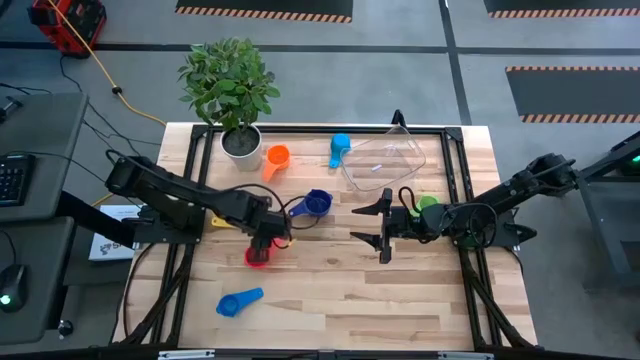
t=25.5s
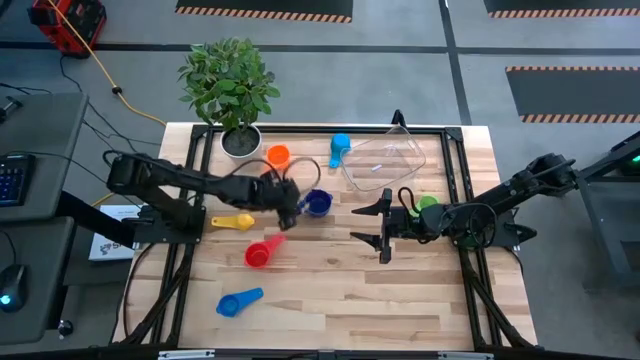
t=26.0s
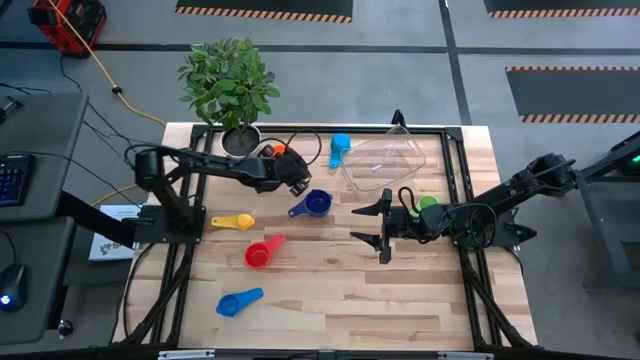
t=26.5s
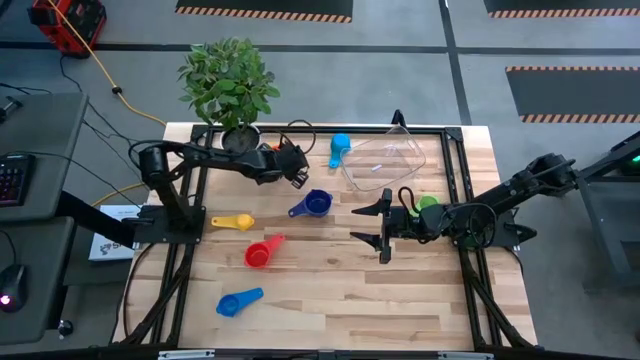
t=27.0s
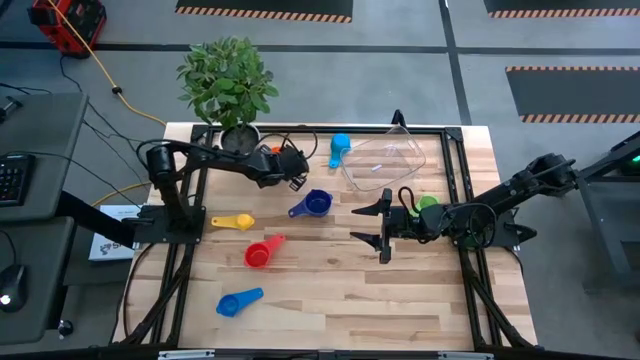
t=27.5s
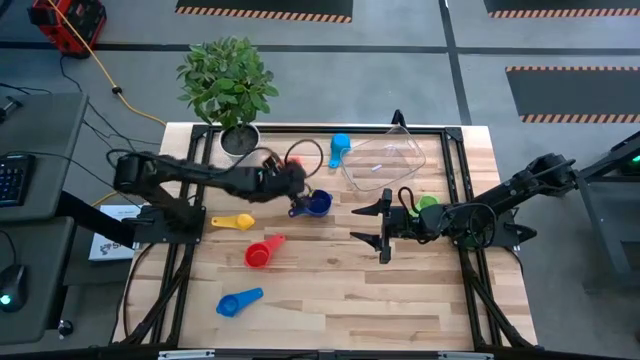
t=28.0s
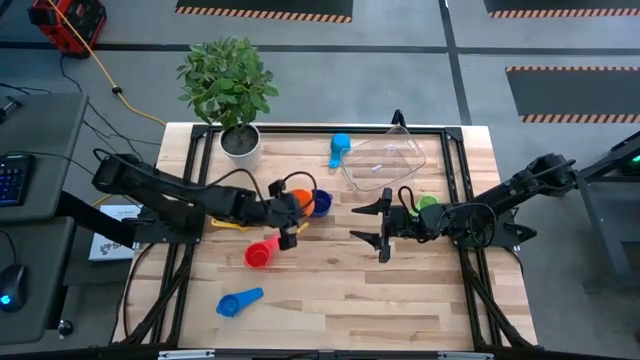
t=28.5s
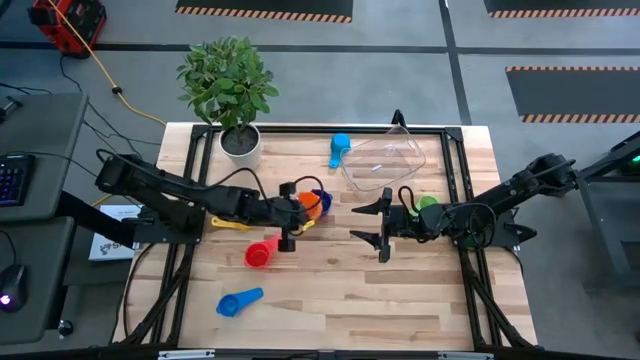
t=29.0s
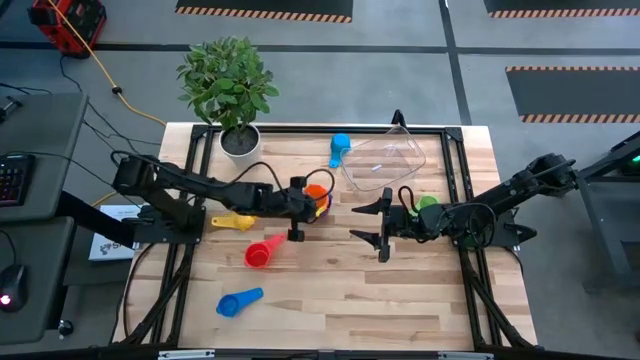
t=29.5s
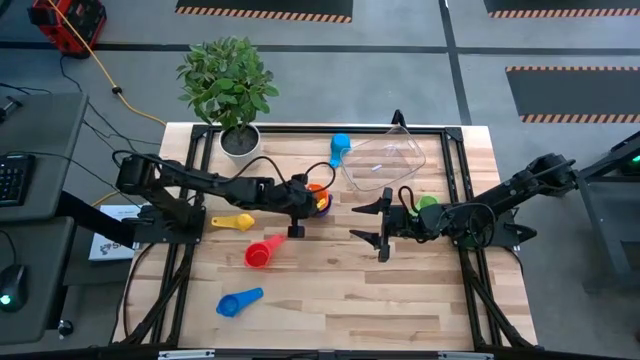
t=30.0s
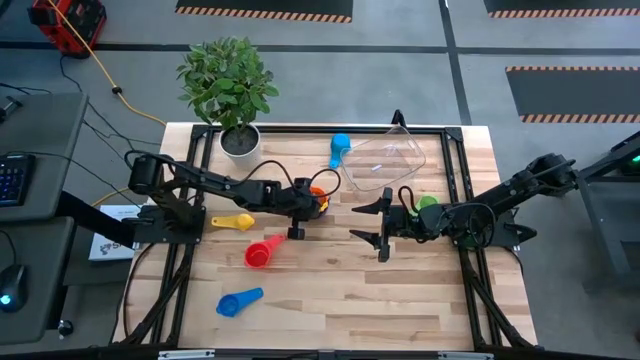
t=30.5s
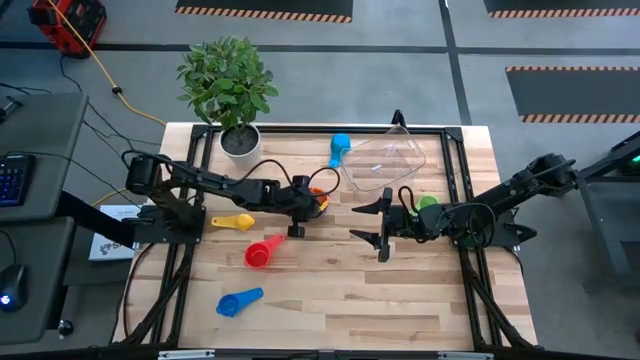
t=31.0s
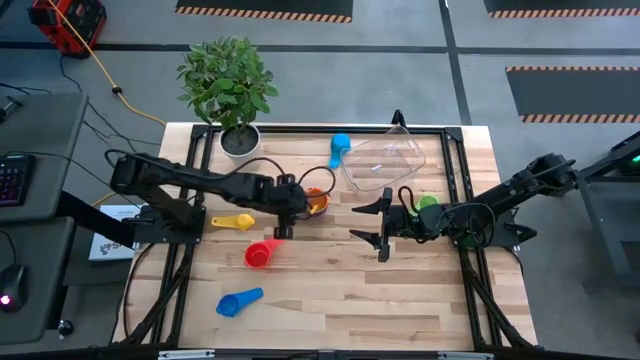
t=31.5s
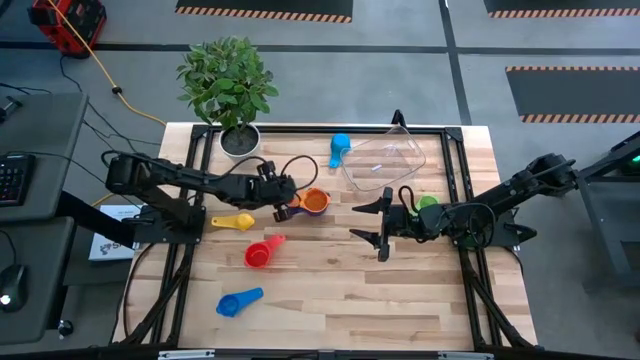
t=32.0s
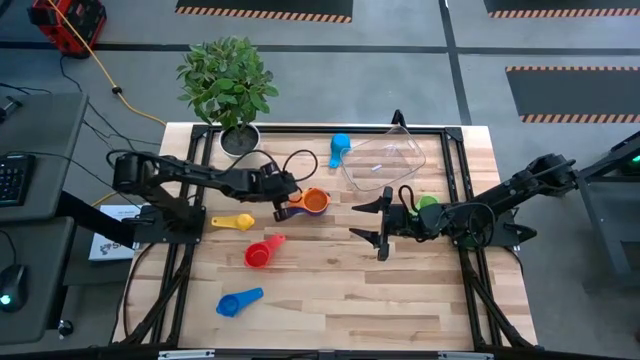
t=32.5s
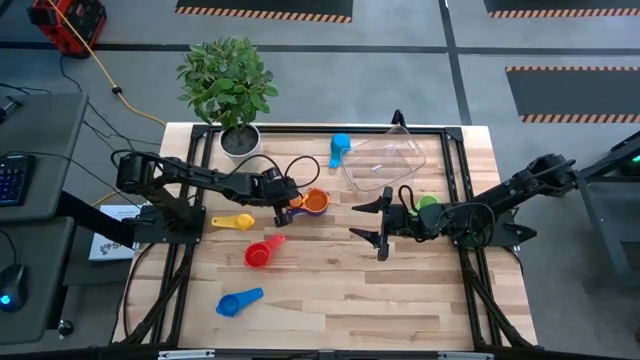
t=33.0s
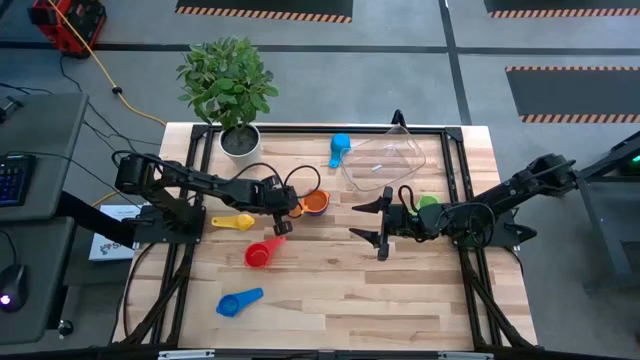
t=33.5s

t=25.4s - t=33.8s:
Task: Nest measuring cups in basket
Stack the orange measuring cup on top of the violet measuring cup

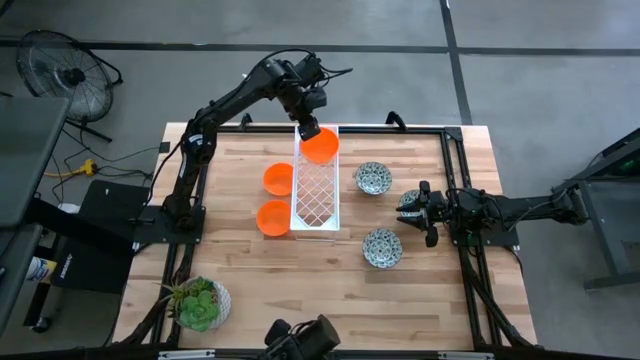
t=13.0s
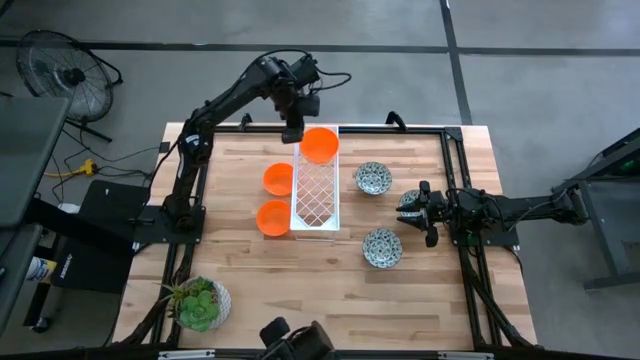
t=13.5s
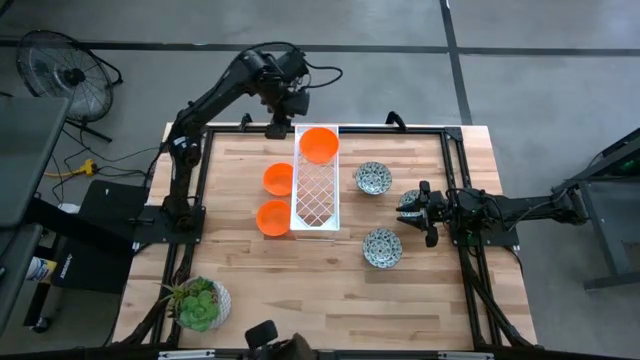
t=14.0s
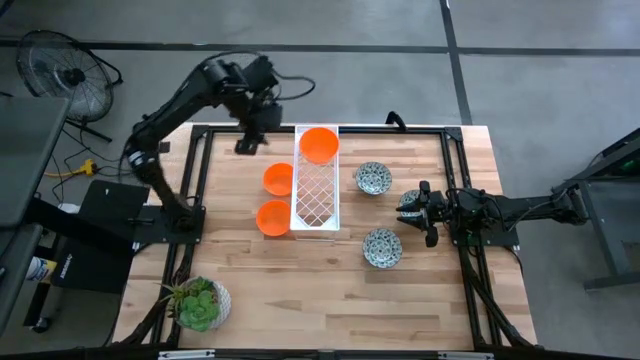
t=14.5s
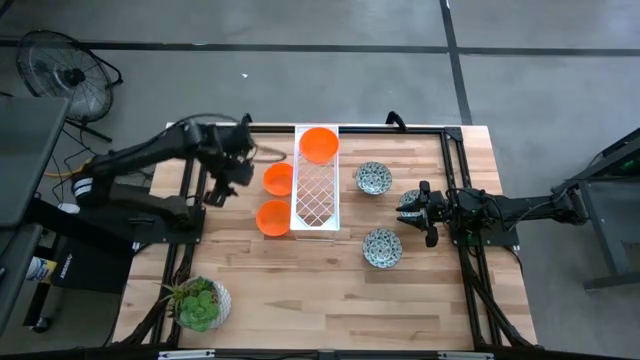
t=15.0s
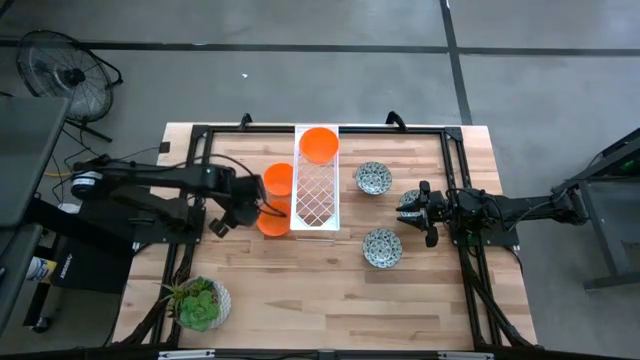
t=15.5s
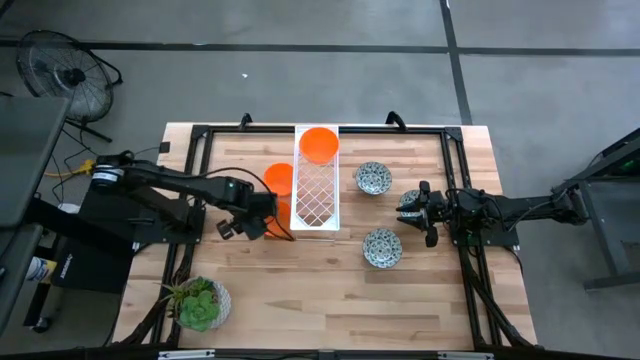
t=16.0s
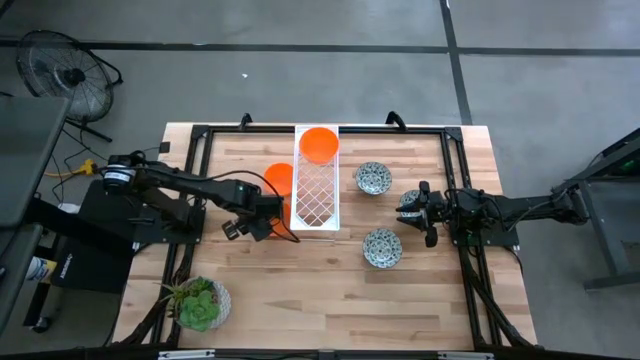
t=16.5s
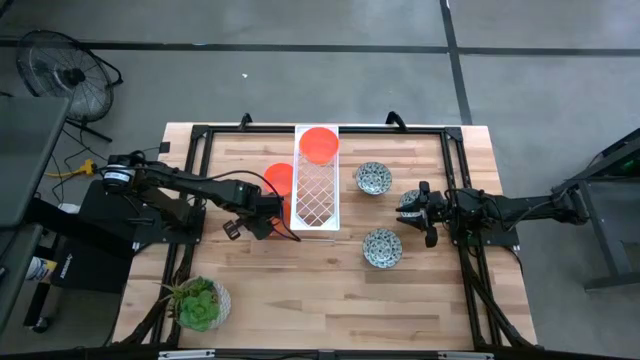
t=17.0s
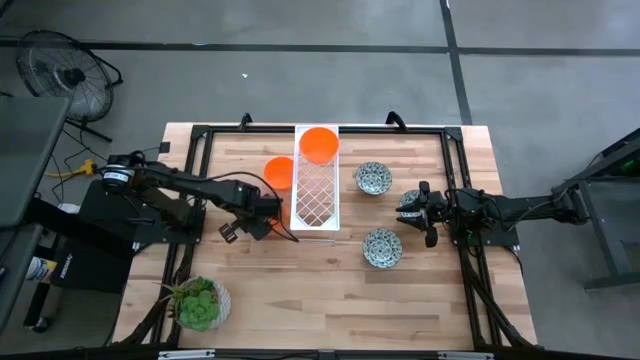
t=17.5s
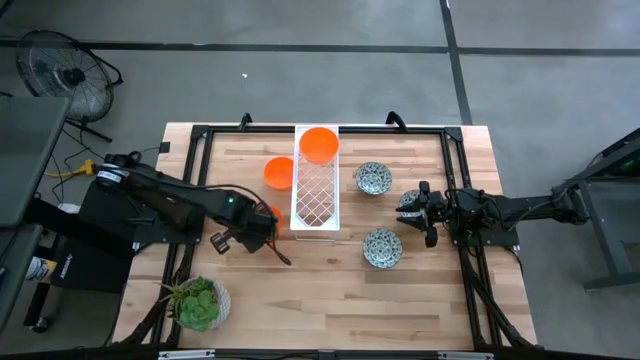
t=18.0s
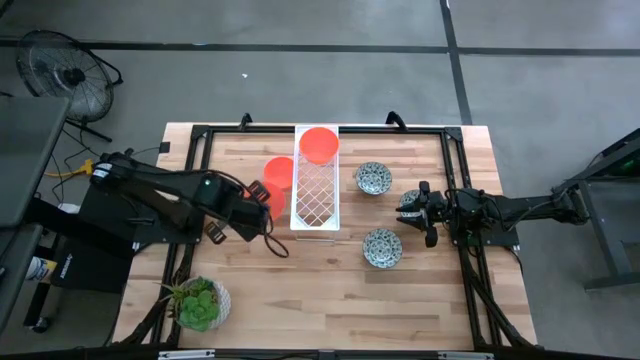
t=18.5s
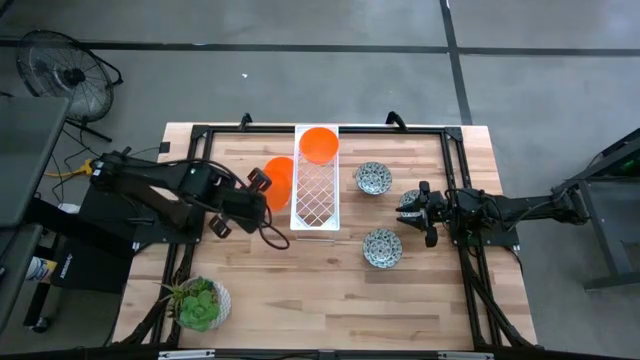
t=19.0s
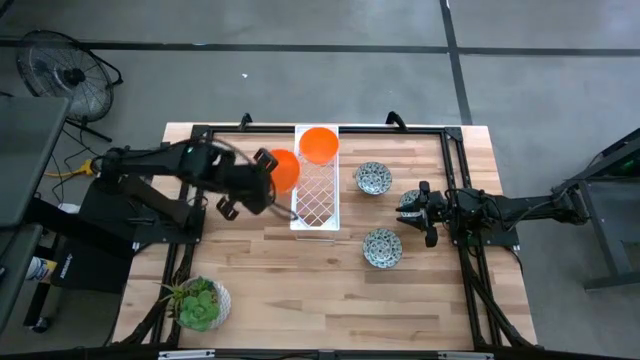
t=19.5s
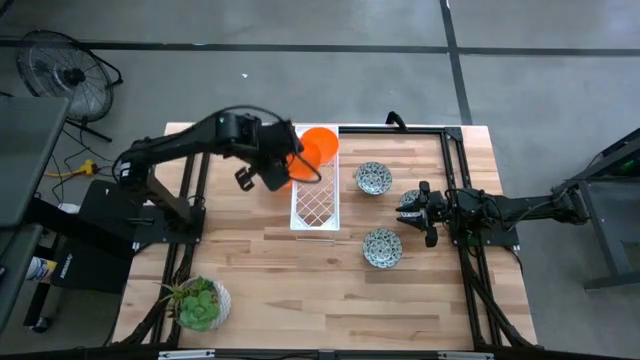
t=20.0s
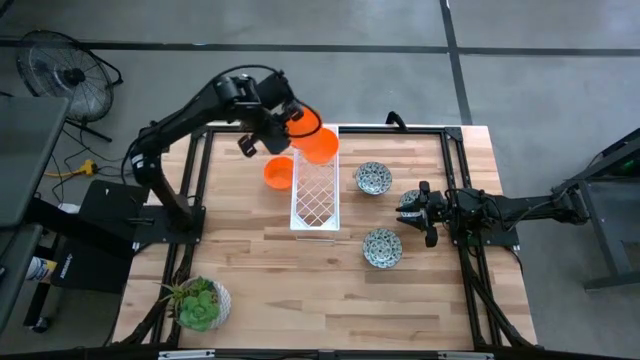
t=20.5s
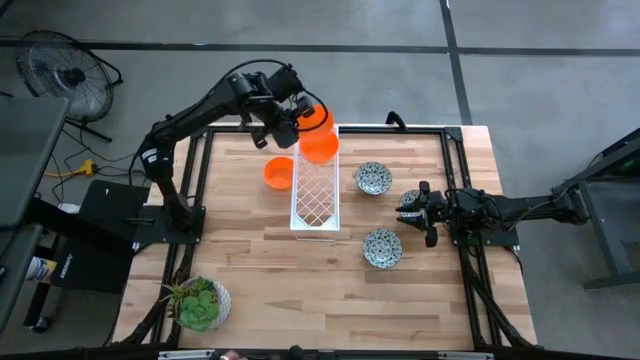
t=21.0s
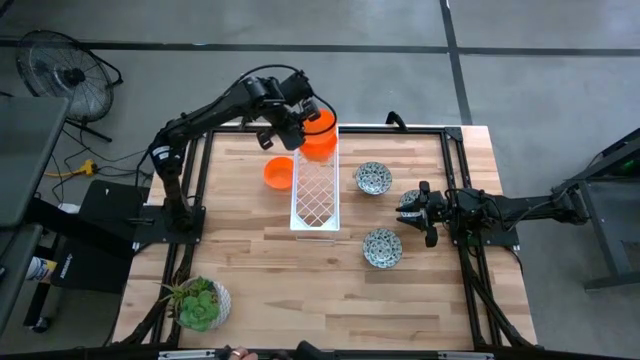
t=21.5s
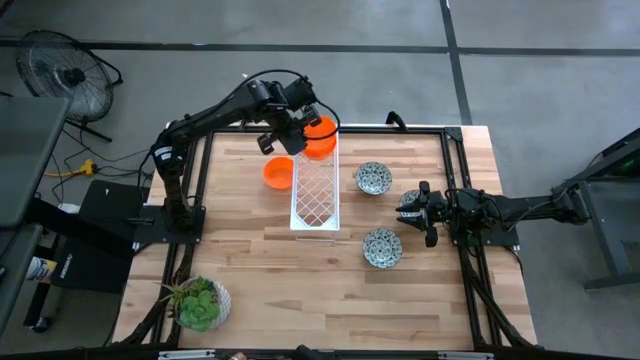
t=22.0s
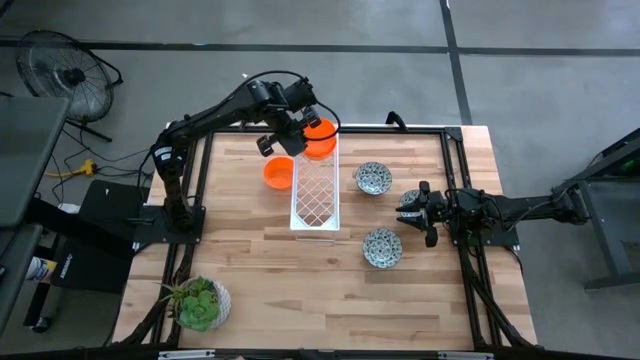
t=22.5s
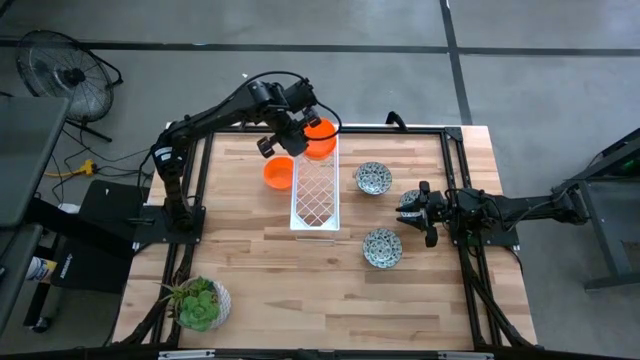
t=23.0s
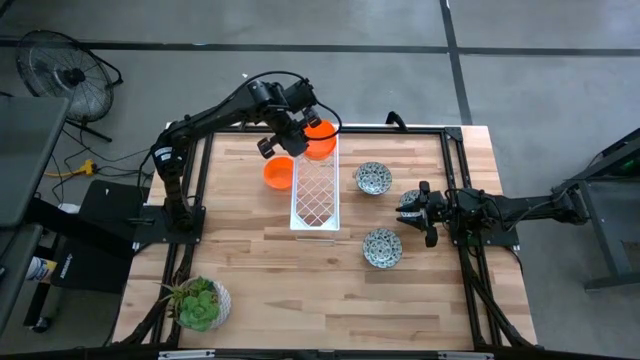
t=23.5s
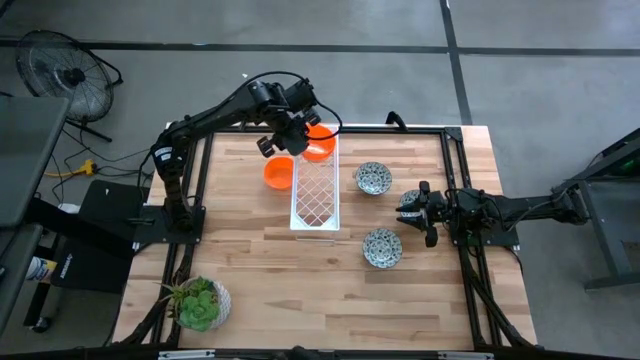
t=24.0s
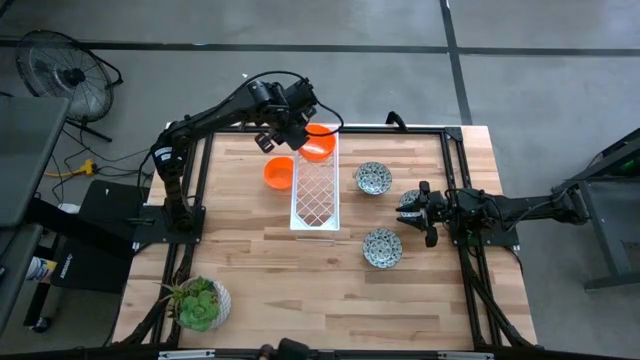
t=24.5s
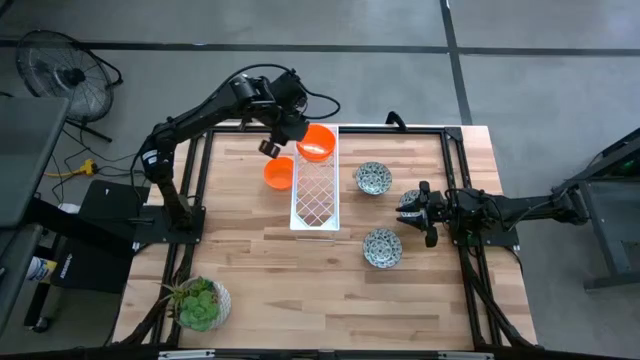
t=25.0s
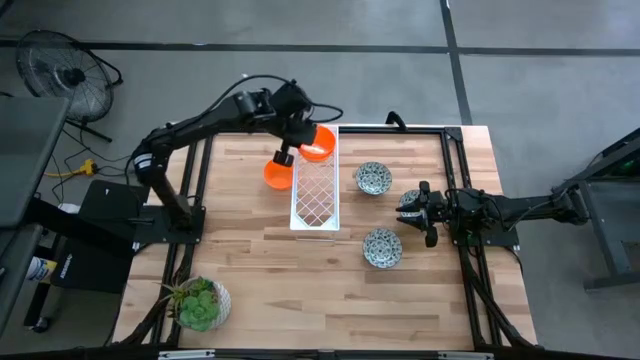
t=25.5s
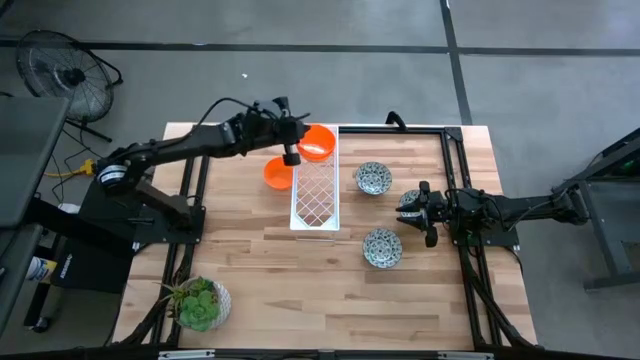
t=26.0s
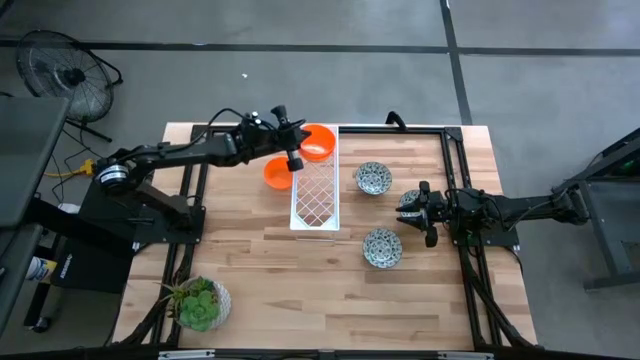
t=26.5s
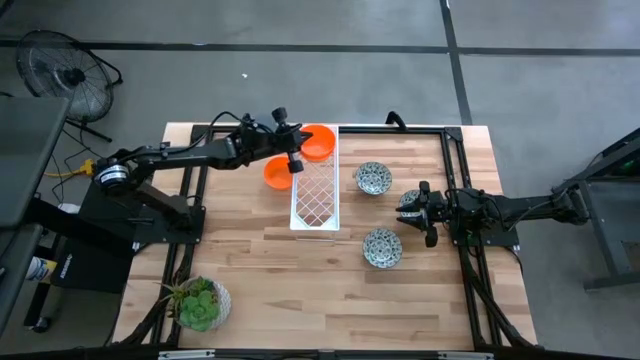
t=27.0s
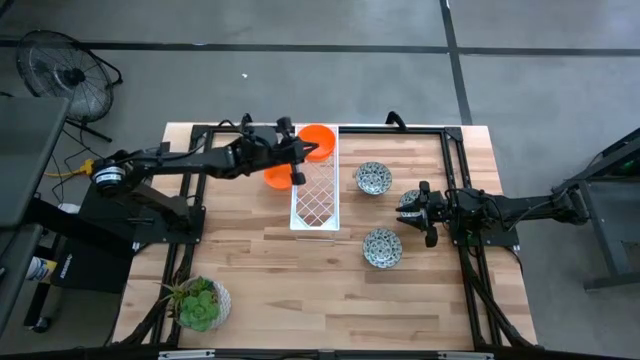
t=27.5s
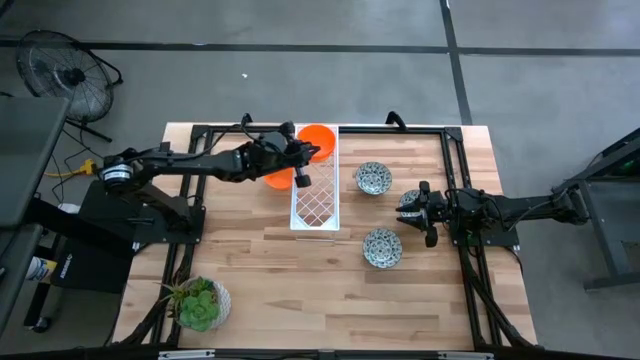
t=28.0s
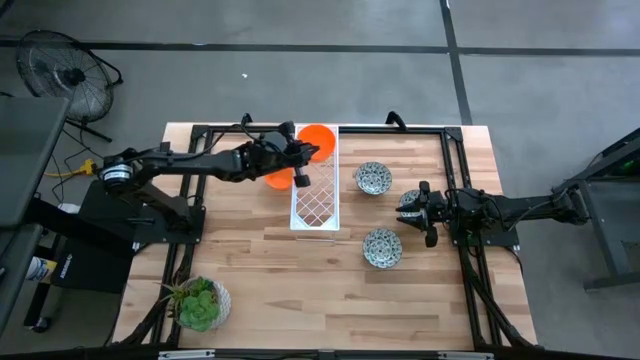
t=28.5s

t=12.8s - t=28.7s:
Task: Pick & Place Mini bowls
Stack the bottom orange bowl on top of the other orange bowl on the shelf
